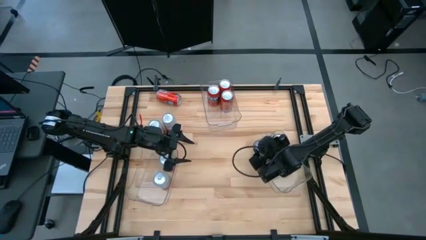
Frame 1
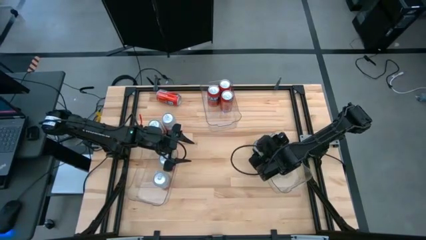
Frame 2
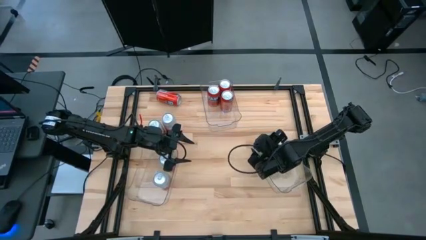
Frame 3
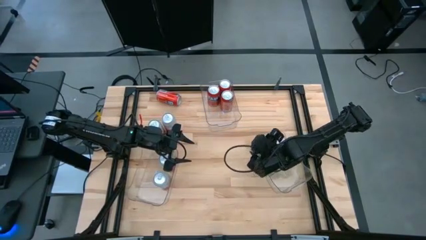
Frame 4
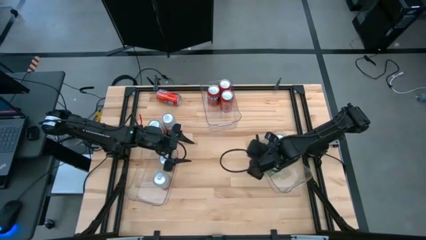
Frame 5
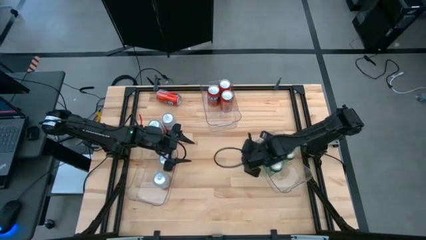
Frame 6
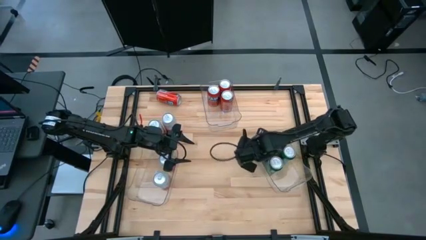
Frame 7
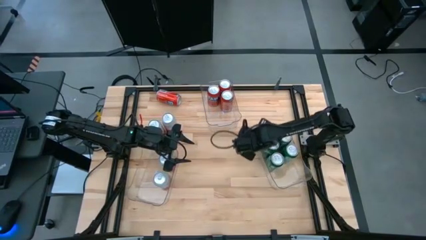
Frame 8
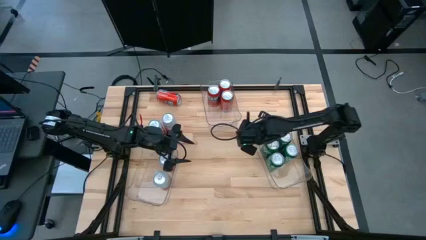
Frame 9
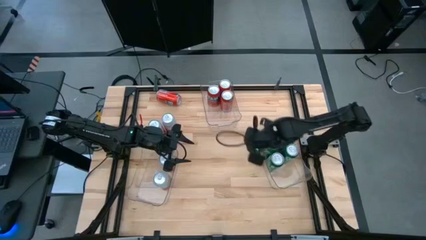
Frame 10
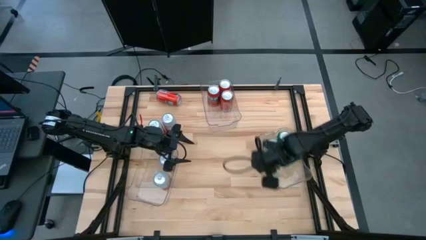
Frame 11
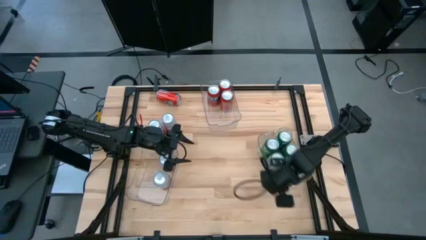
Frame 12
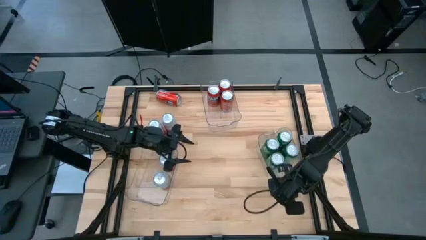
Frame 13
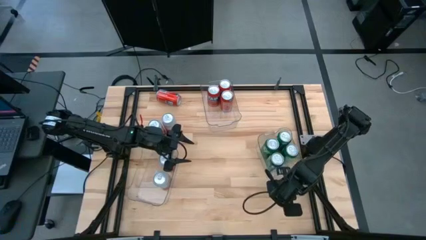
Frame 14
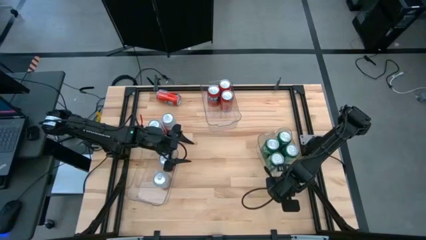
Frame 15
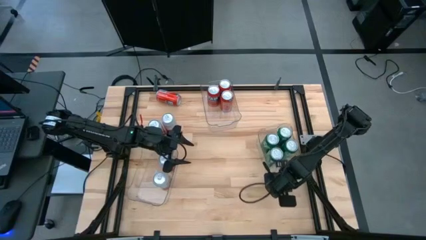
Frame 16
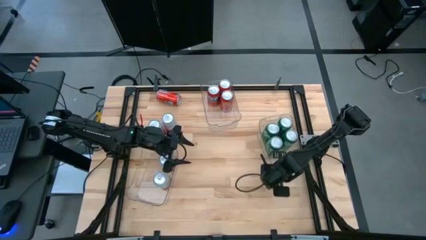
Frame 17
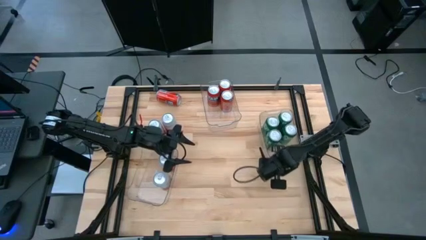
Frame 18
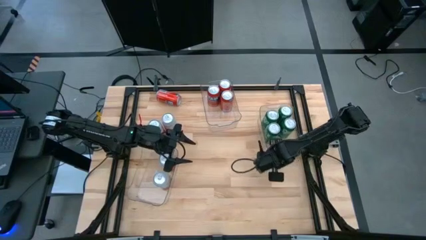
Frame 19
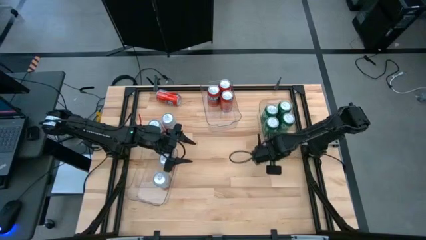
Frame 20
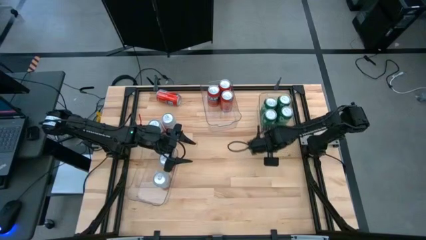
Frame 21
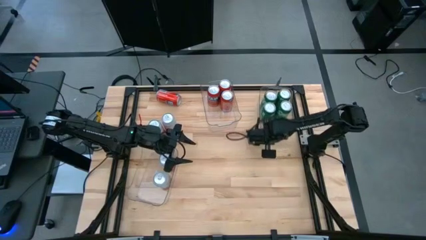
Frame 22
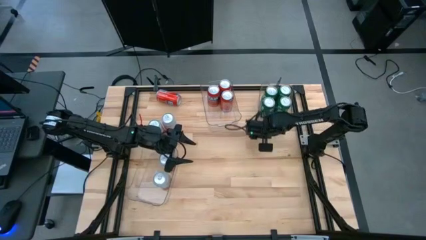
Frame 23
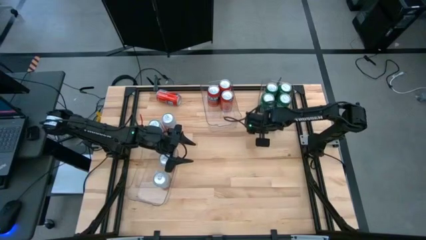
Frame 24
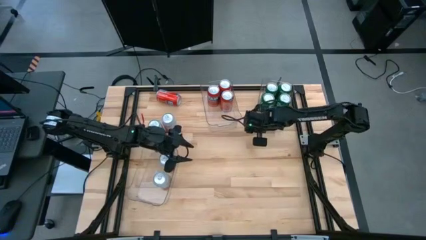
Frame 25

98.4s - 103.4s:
Task: Sort soda cans
Move the bottom right transparent bin on the right side of the top transparent bin

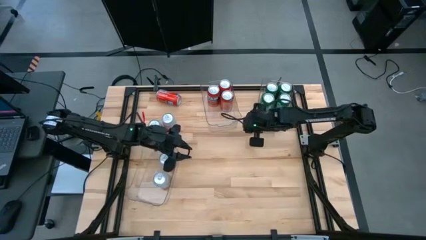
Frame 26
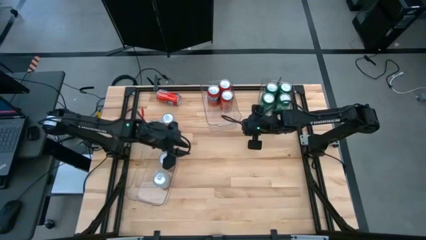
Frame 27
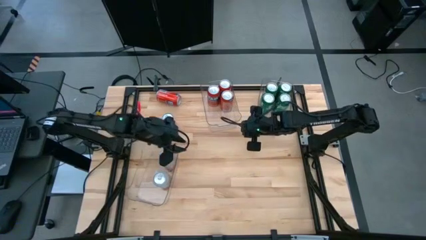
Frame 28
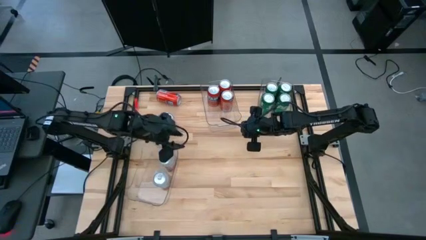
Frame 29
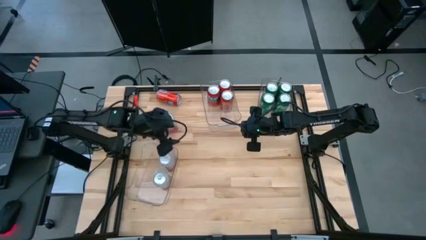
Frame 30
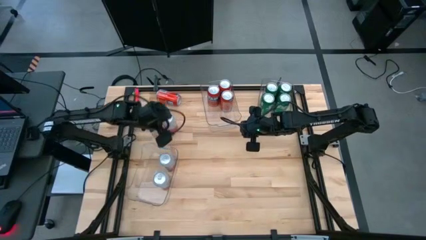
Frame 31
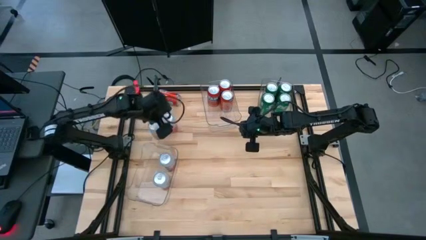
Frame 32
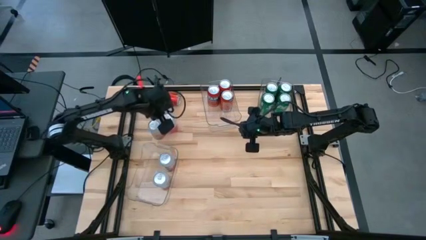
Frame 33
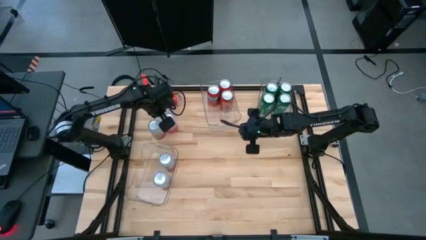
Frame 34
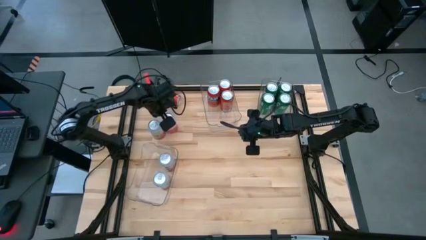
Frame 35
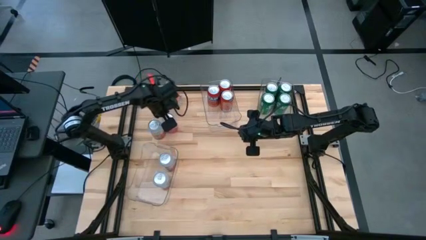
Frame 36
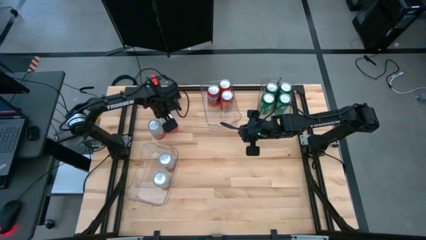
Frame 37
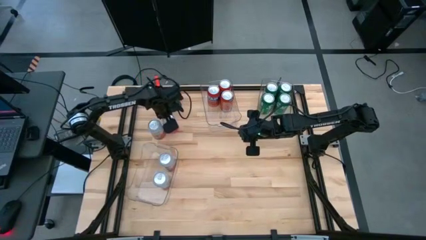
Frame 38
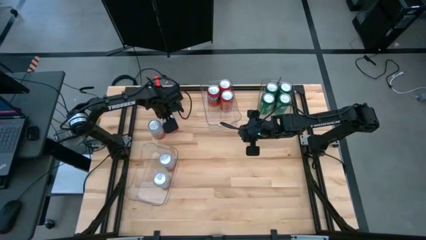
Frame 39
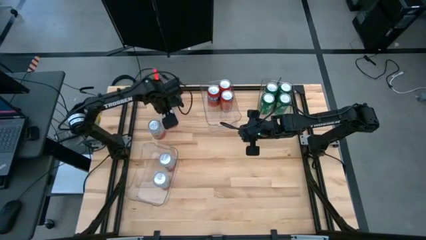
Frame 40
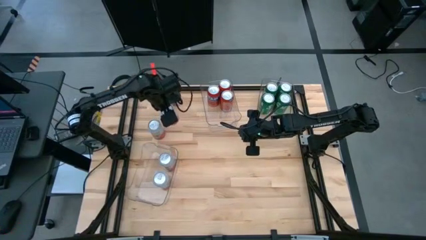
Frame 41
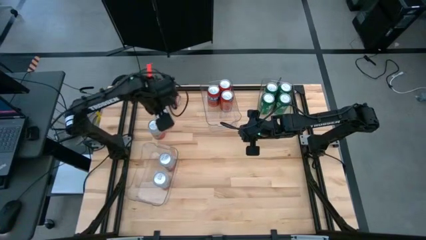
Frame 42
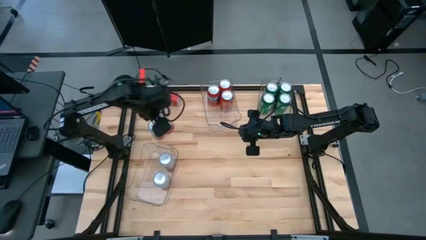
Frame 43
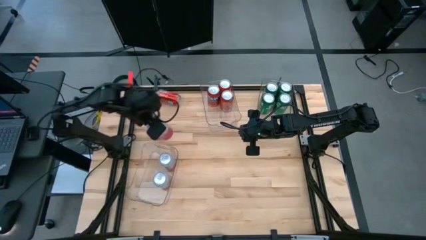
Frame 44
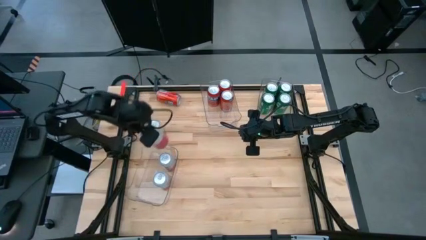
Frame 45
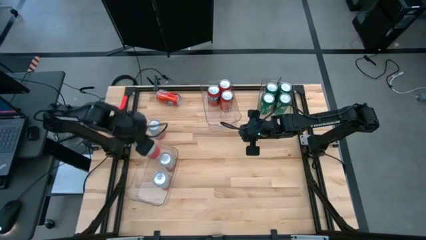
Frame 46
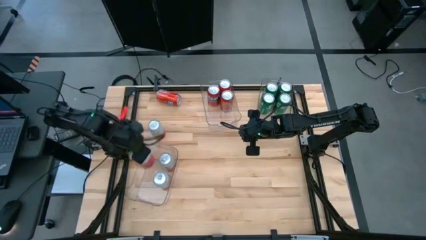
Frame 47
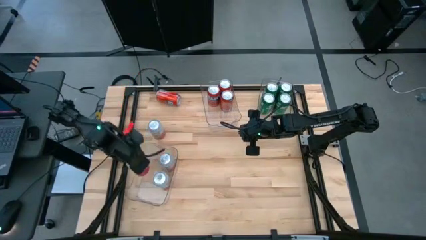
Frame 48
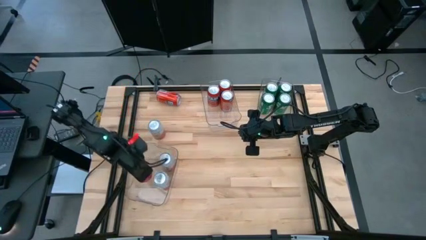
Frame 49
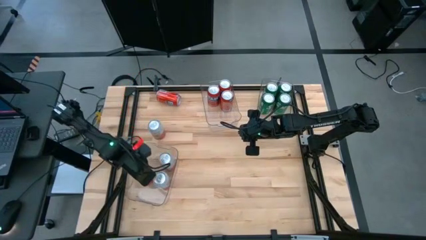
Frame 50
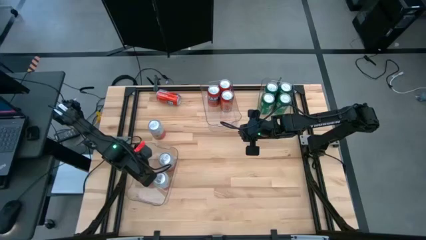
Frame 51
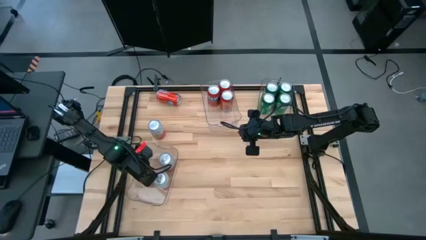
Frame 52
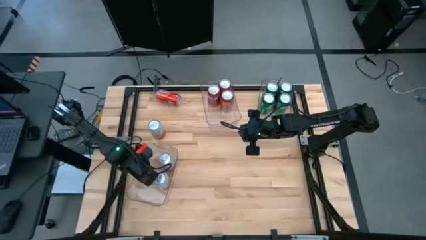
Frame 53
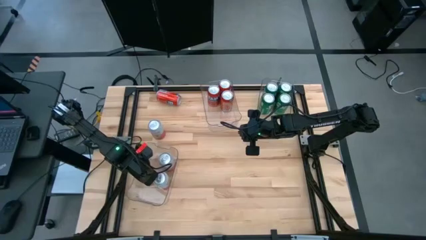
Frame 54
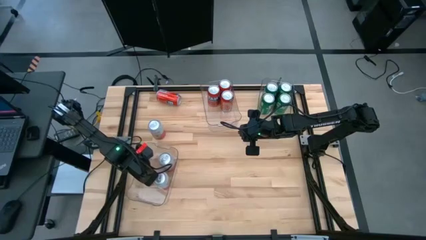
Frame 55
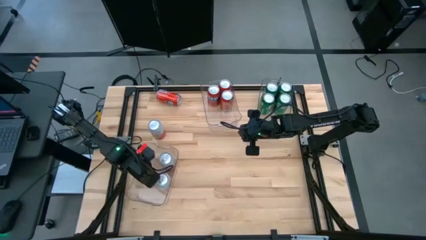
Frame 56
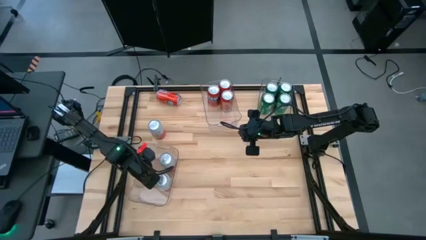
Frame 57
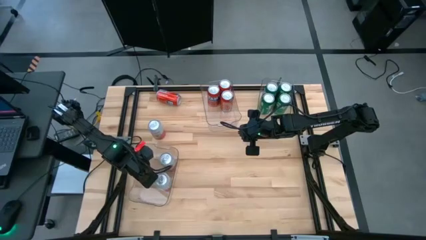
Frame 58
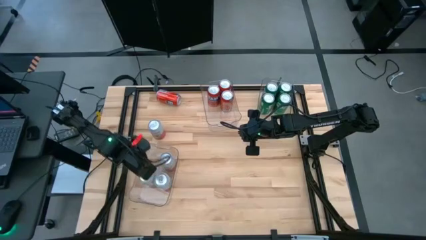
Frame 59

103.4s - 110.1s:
Put the white soda can into the bottom left transparent bin

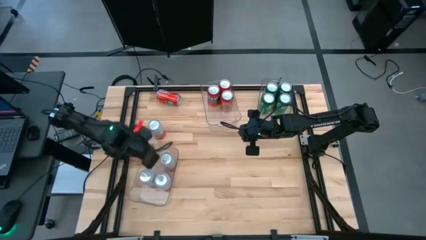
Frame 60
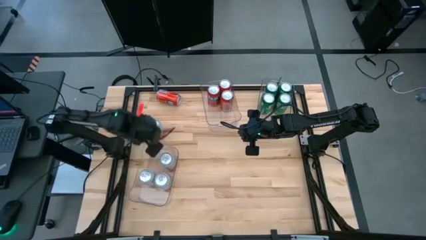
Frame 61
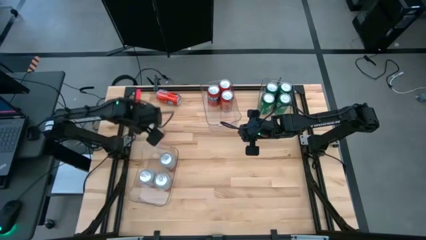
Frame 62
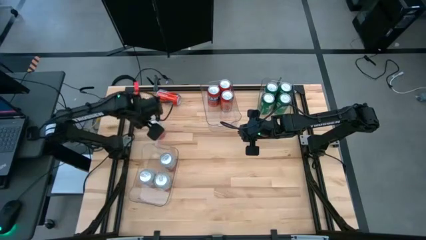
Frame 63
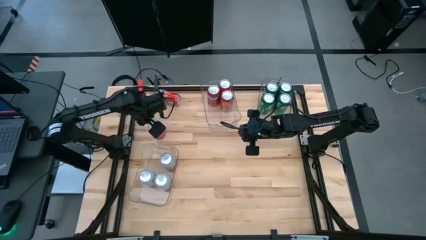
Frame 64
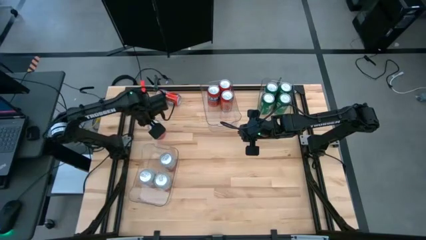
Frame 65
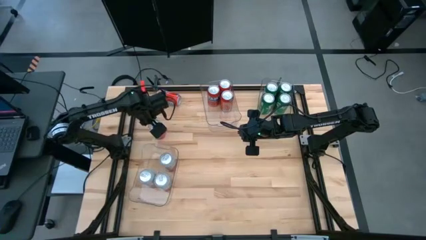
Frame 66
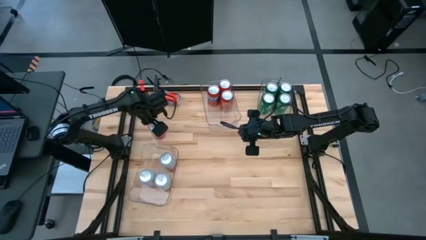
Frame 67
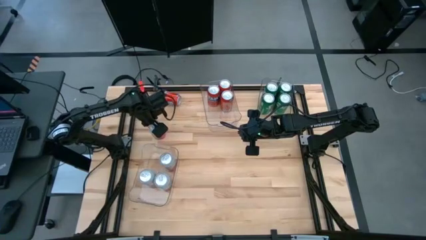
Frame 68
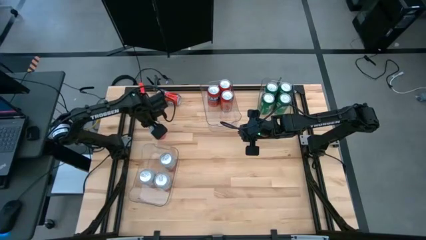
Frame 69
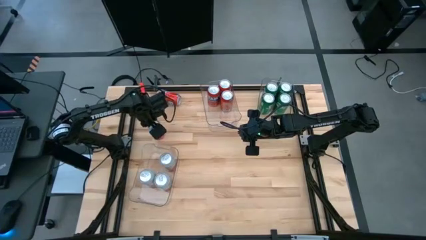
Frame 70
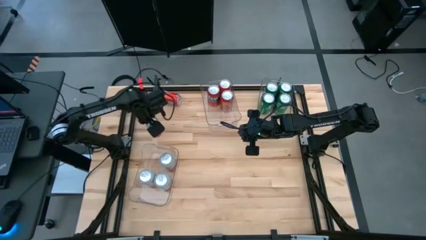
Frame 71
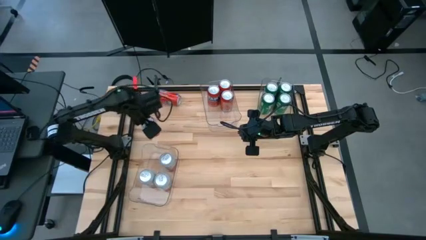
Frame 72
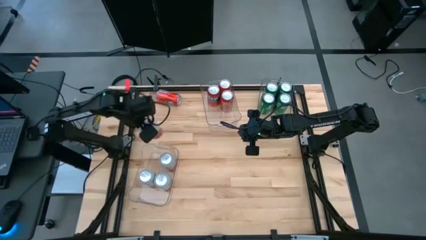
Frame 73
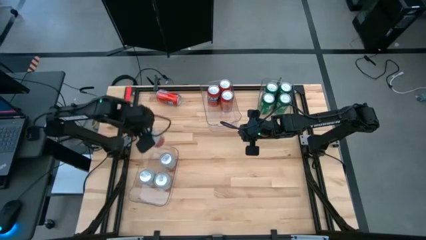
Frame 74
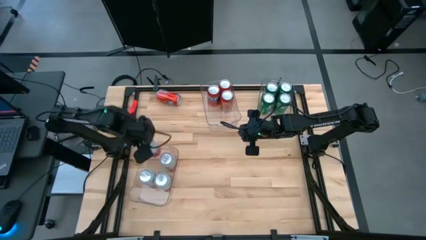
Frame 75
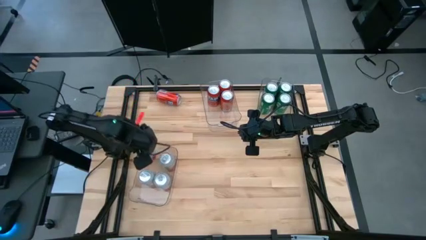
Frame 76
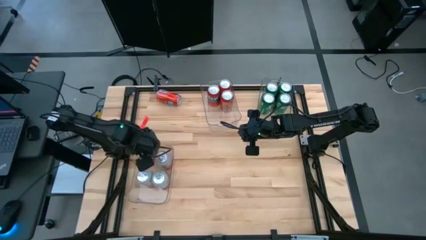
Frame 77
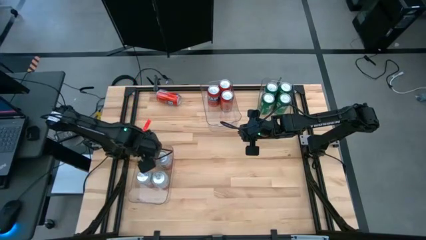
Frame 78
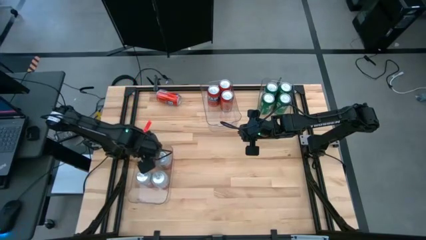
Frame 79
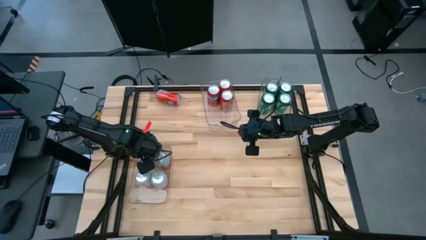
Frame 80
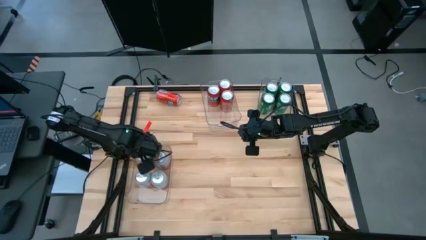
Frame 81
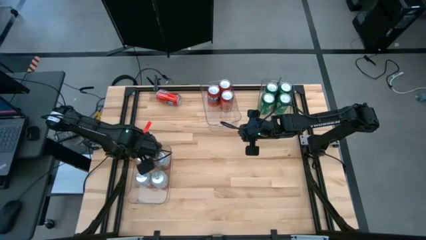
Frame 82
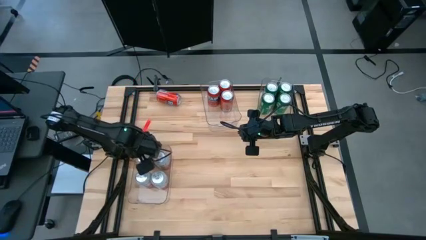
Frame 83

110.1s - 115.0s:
Put the white soda can into the bottom left transparent bin
